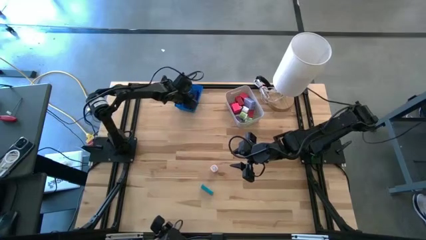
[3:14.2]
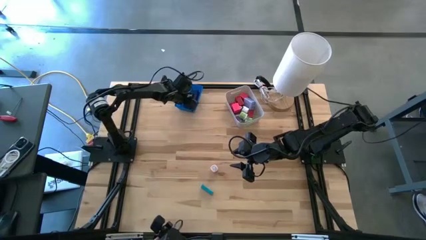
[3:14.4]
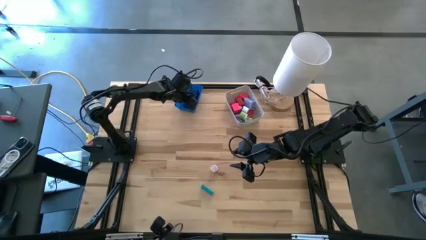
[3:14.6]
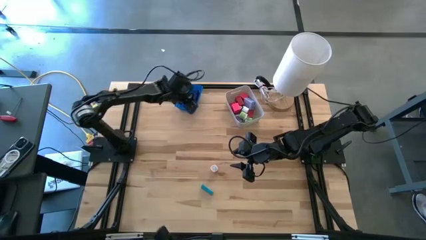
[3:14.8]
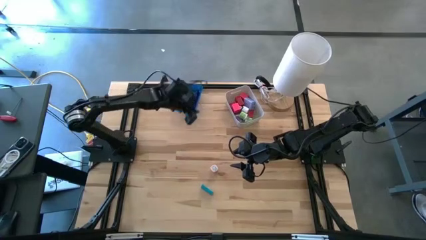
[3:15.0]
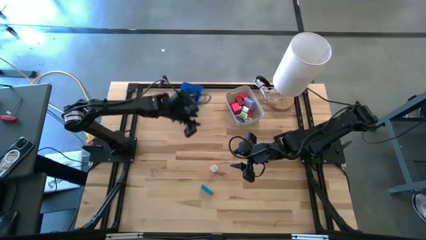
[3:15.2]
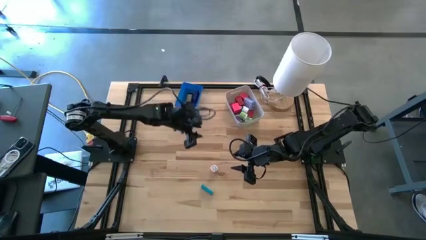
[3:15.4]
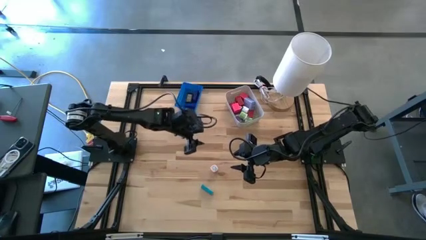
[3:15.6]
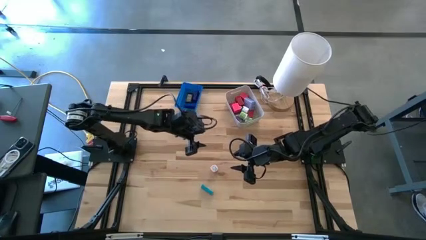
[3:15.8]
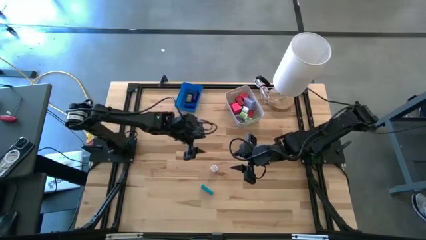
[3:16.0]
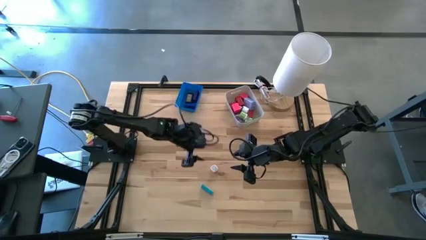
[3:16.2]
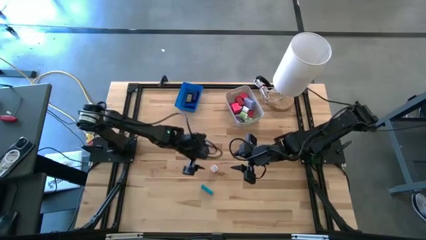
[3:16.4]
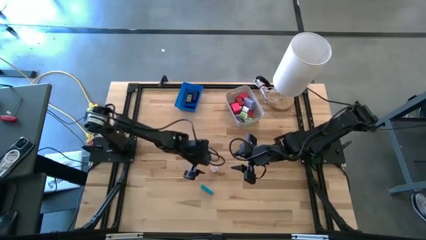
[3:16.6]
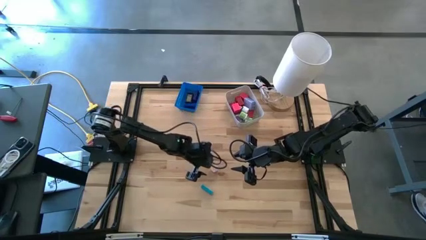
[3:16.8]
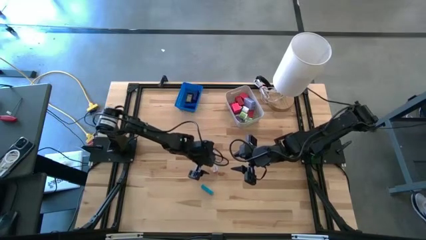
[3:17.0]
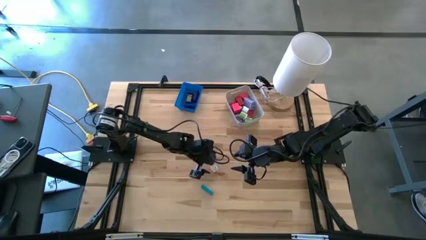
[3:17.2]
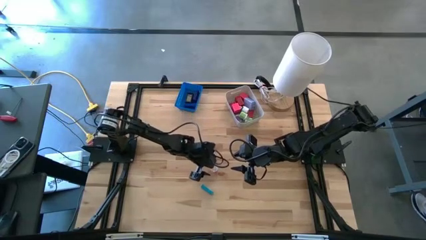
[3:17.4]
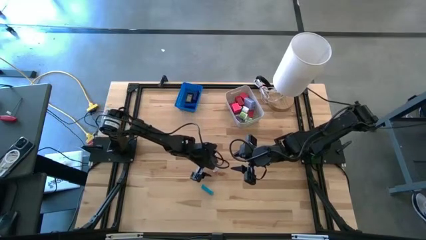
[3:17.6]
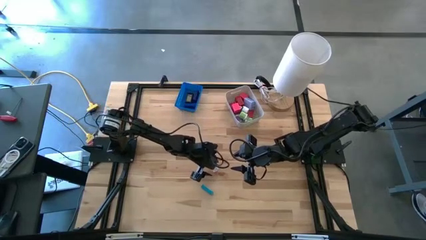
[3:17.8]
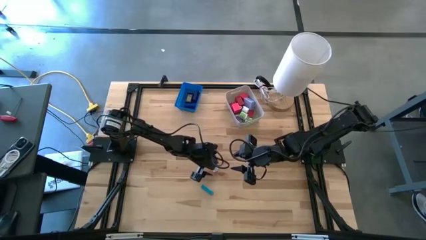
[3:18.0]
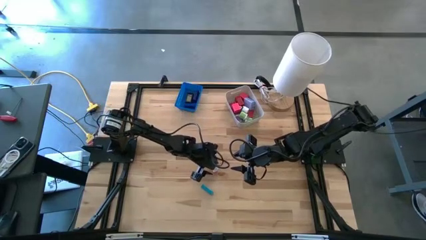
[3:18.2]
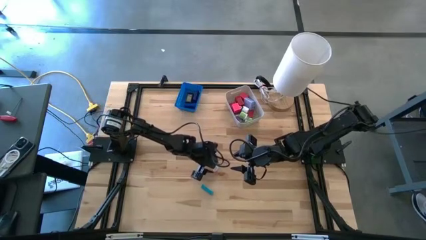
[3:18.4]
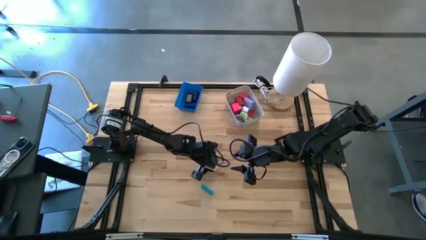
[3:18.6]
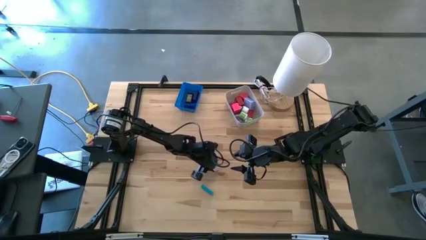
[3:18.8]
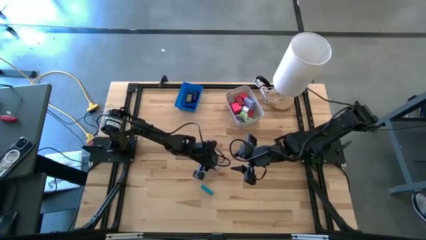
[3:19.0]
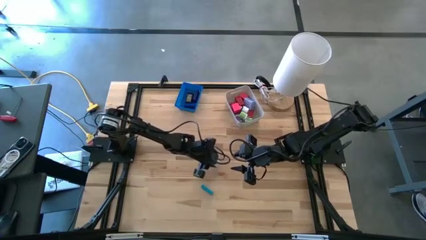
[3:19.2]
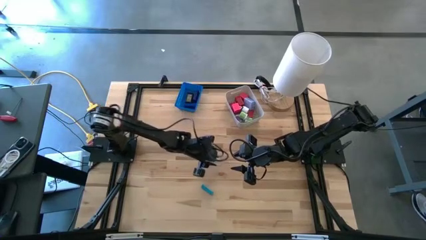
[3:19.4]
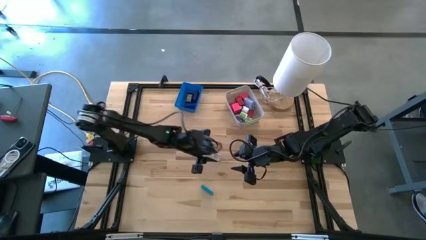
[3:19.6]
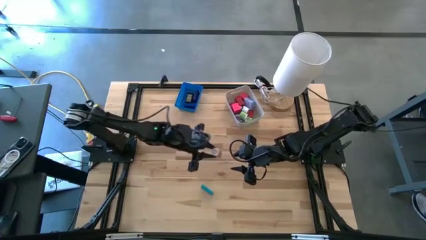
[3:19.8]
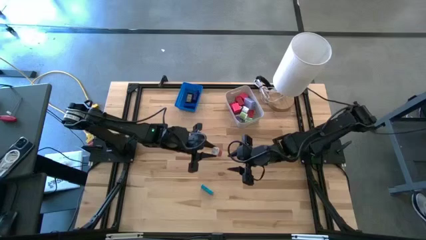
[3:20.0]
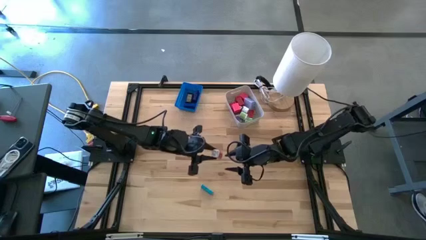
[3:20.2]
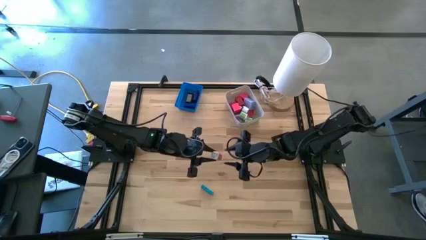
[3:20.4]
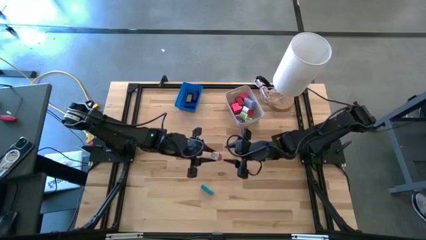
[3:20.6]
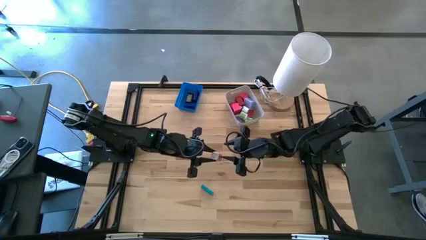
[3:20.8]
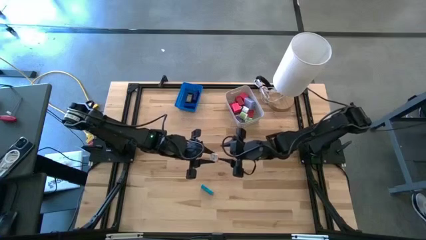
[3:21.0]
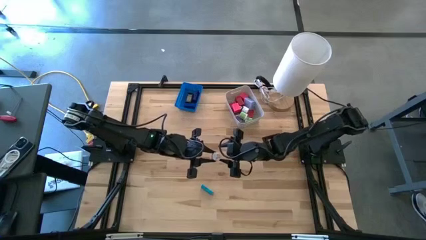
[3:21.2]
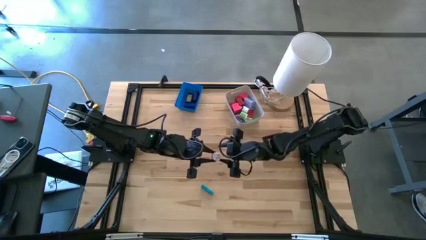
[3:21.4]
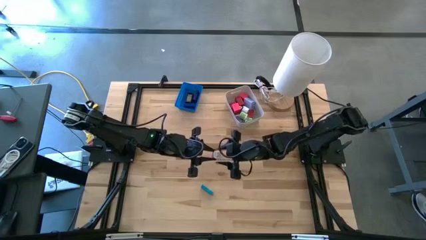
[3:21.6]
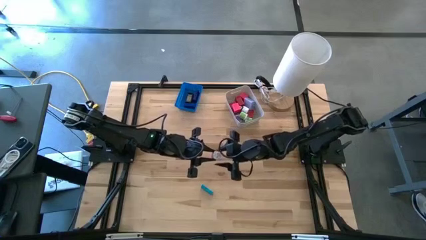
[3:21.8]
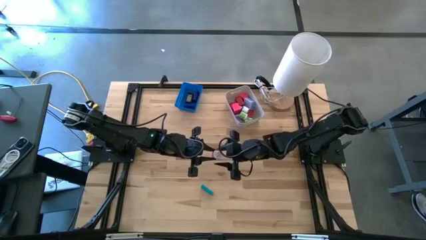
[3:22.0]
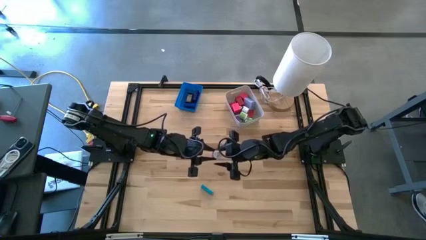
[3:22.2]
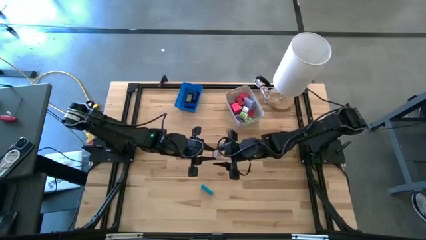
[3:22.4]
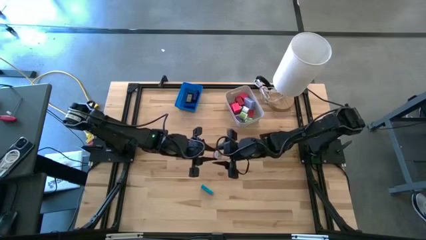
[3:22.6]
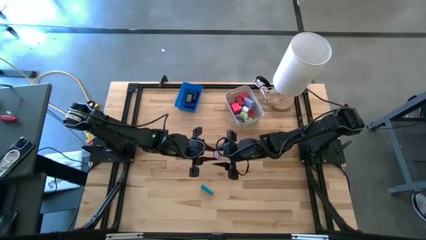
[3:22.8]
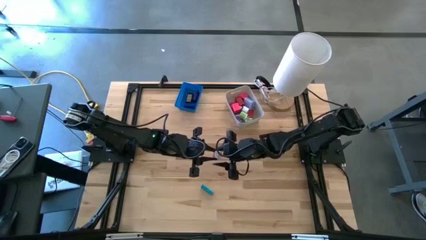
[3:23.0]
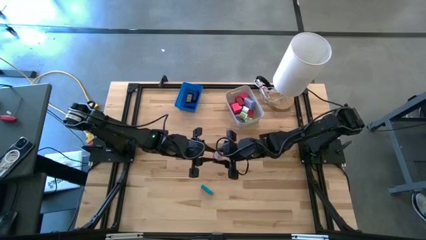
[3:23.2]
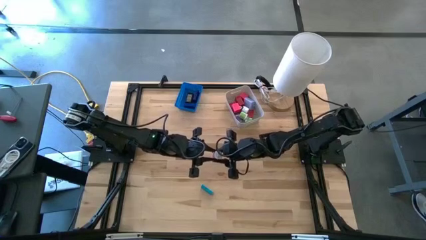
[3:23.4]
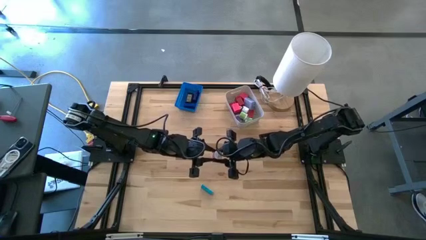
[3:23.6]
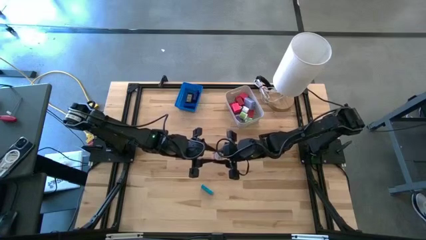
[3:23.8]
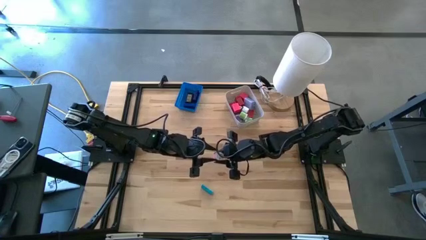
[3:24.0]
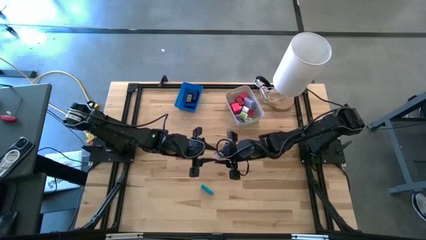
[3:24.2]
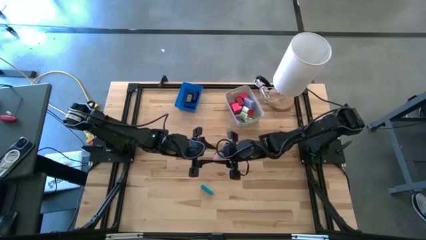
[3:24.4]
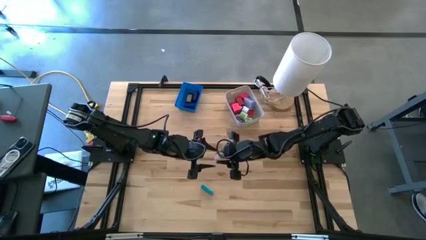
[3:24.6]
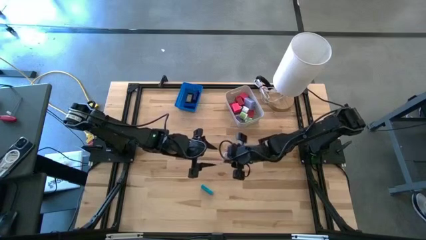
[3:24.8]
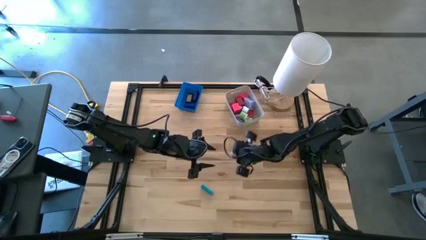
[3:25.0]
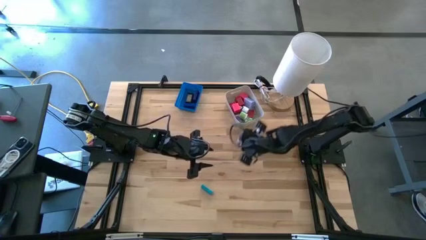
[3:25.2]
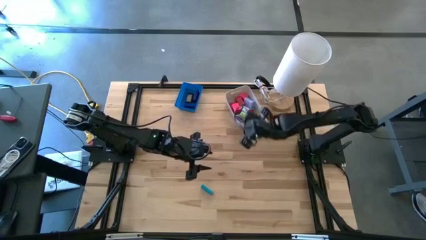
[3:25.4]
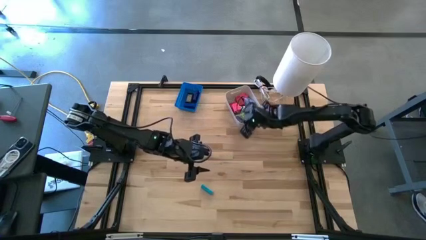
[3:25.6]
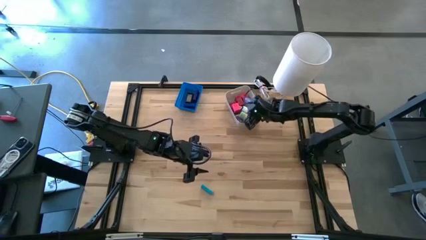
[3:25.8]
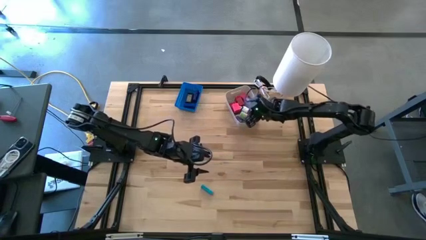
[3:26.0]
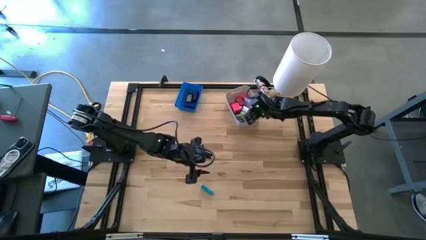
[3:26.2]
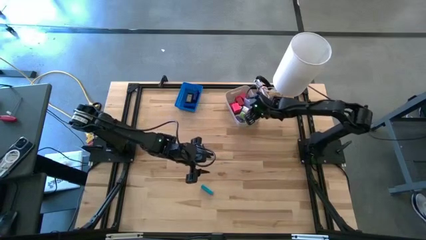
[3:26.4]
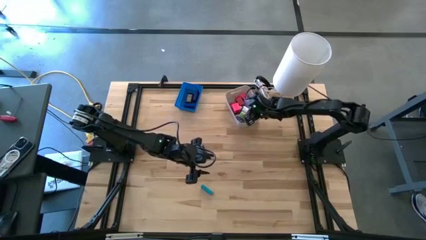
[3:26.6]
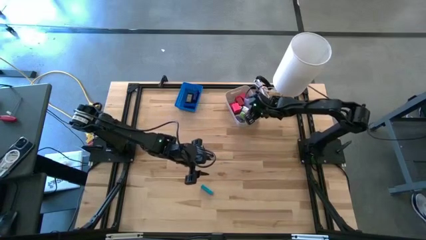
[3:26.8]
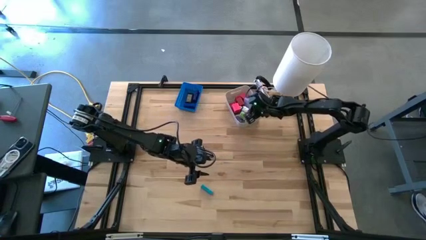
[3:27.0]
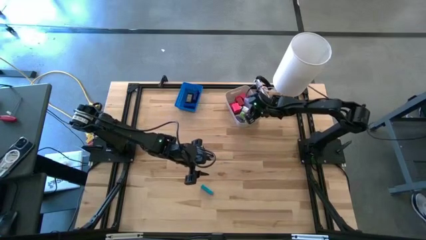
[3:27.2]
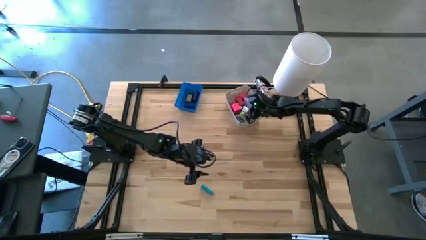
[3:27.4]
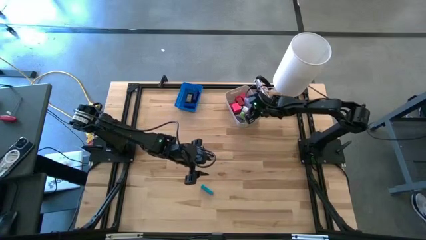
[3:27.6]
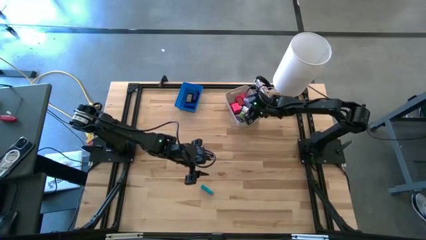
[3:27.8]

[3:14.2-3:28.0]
Task: Pick & Place Office items
Put the light pink charger adapter into the white bin

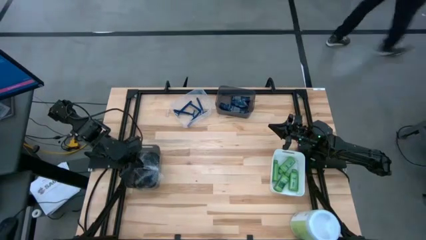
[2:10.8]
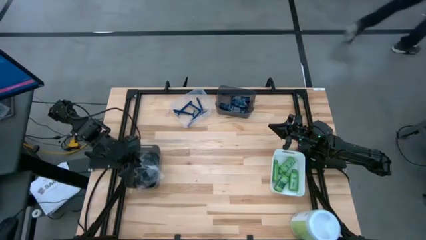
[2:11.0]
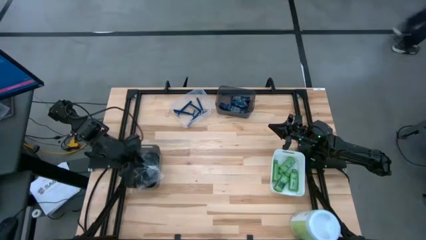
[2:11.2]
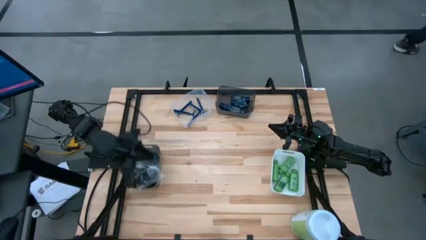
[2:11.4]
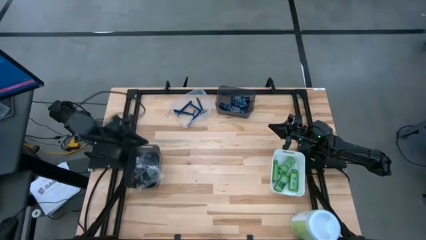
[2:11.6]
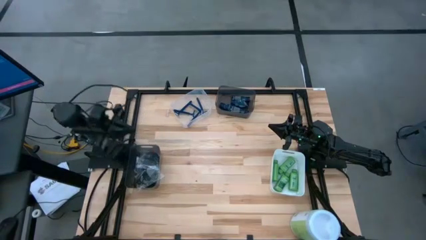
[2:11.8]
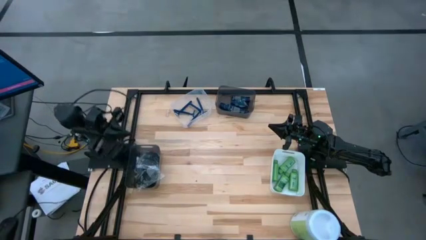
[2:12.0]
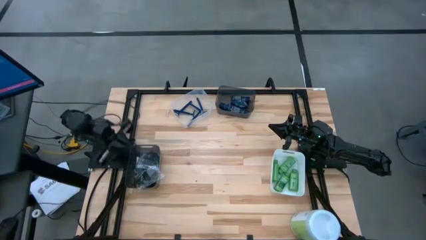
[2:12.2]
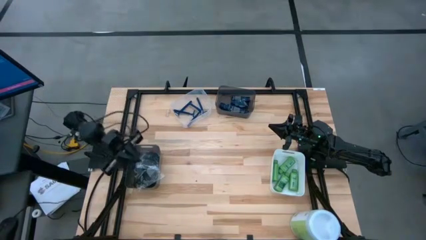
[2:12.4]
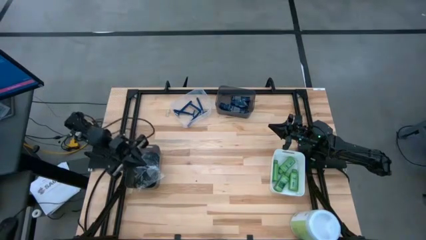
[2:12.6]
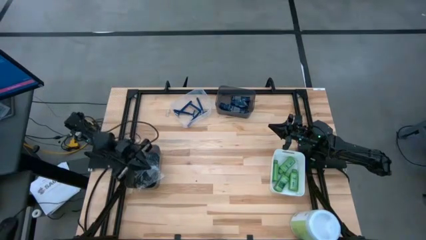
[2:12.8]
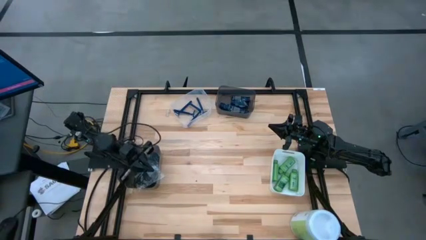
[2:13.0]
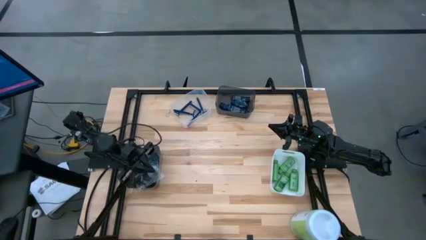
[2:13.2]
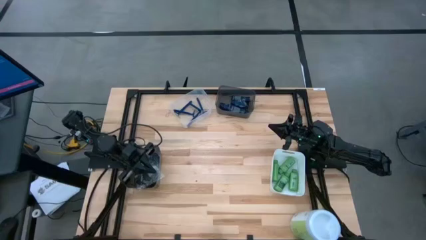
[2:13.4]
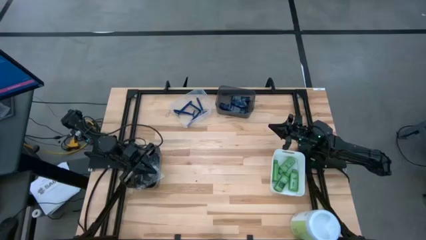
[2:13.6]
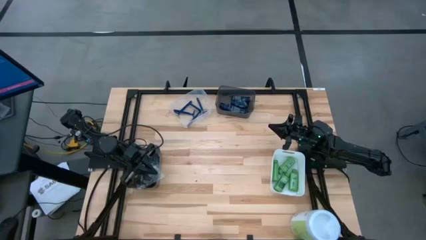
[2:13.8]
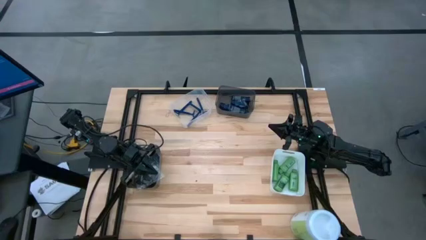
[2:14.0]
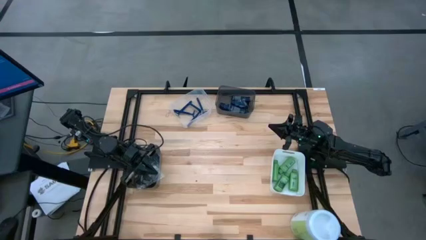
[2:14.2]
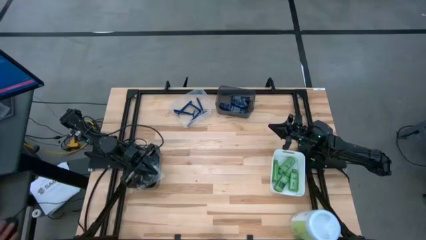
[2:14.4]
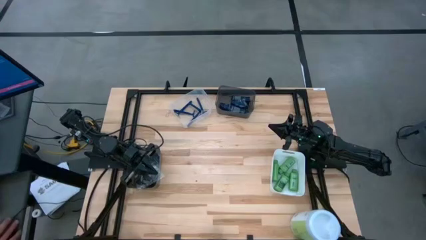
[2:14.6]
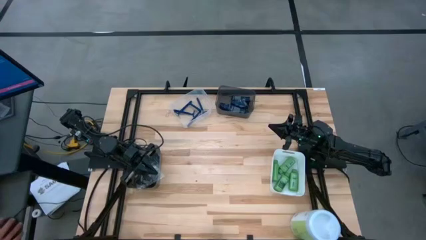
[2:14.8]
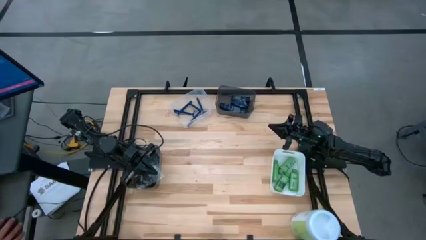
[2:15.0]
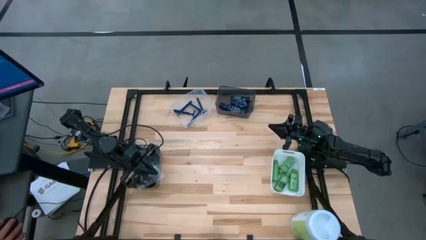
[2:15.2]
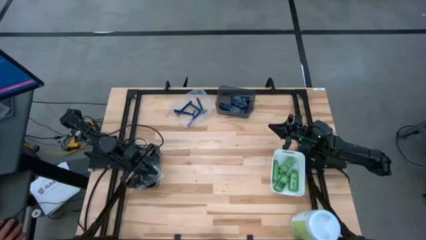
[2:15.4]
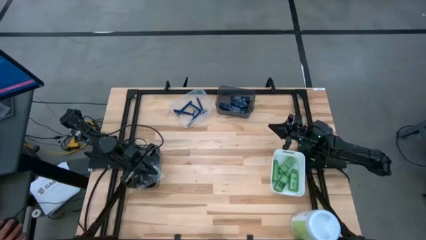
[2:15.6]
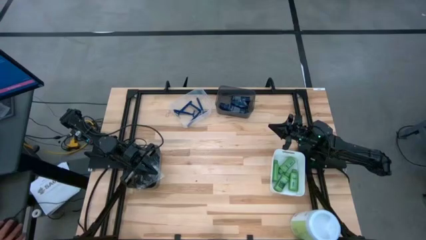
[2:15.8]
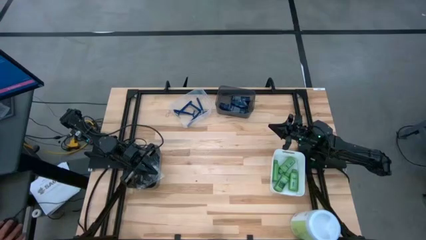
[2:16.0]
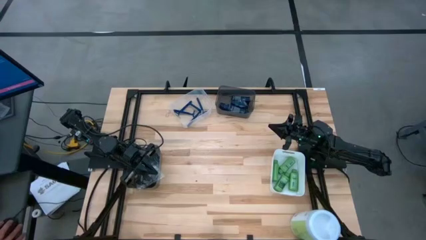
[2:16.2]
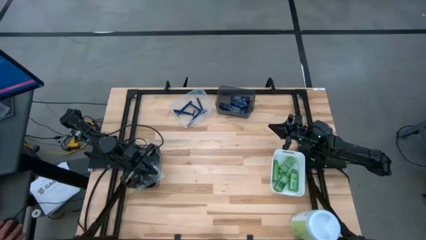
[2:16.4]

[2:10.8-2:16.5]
Task: Pick & Place Travel size toiletries
Return to Home Position
